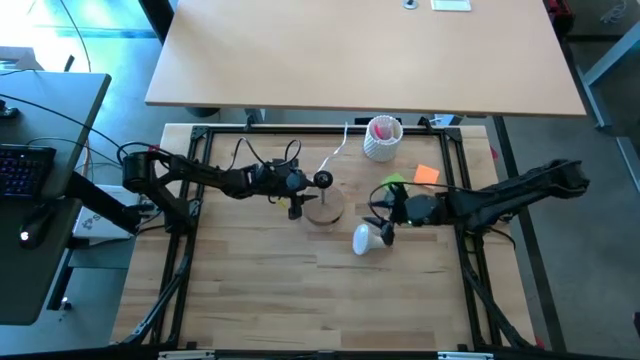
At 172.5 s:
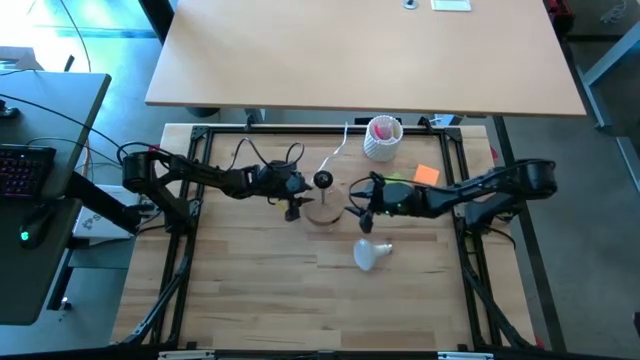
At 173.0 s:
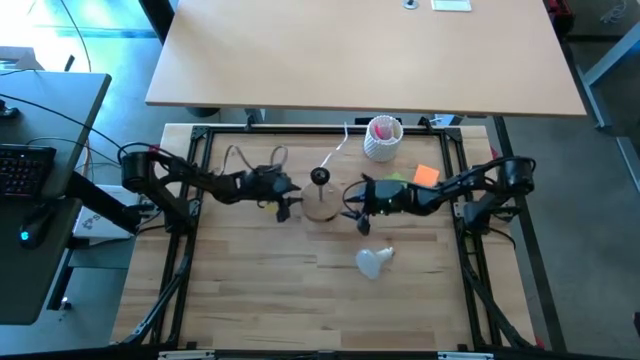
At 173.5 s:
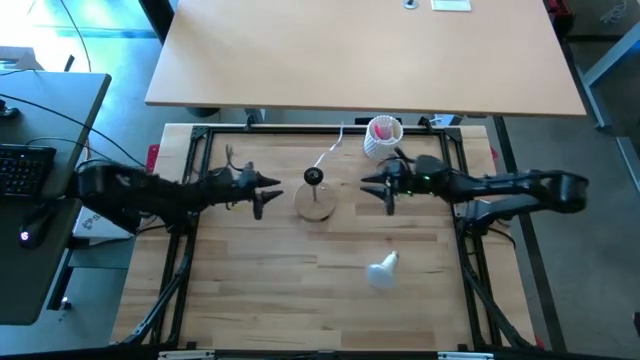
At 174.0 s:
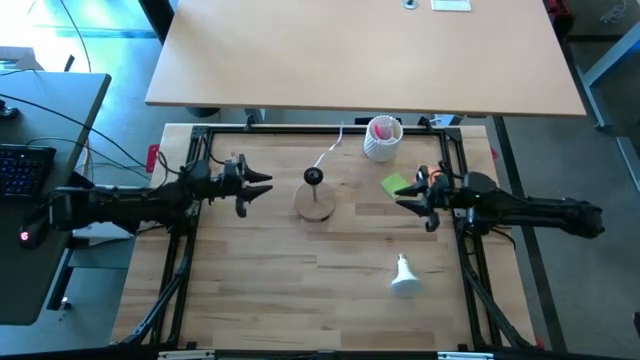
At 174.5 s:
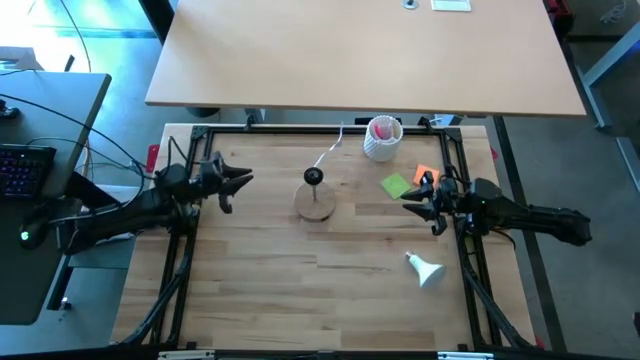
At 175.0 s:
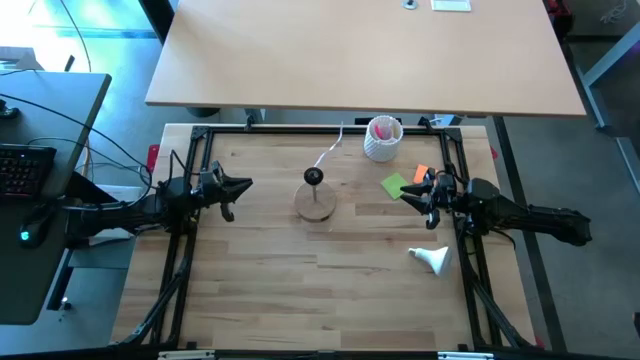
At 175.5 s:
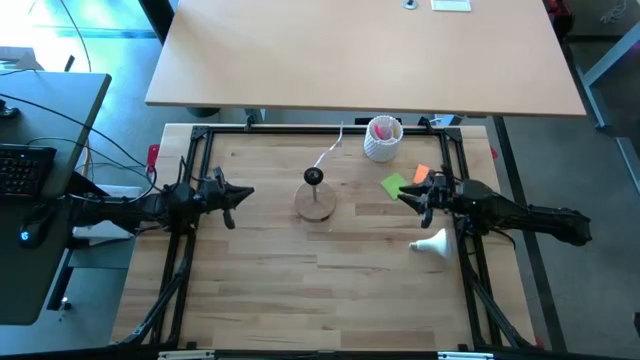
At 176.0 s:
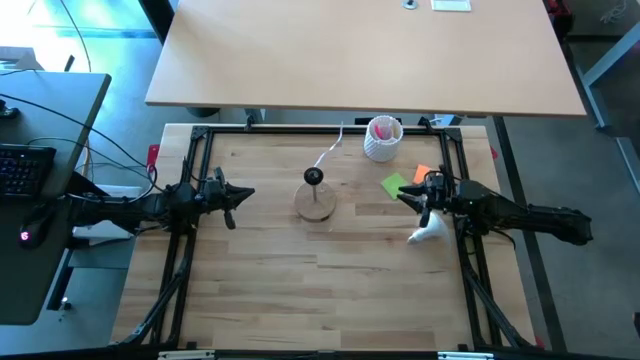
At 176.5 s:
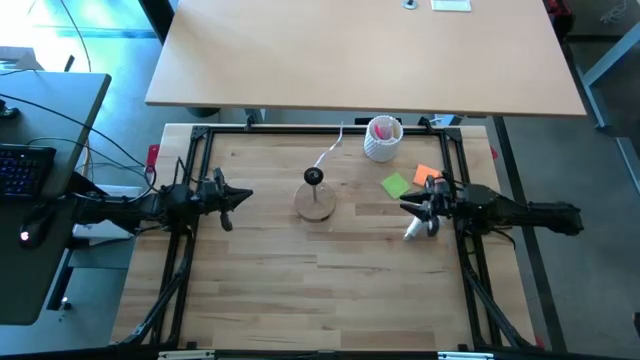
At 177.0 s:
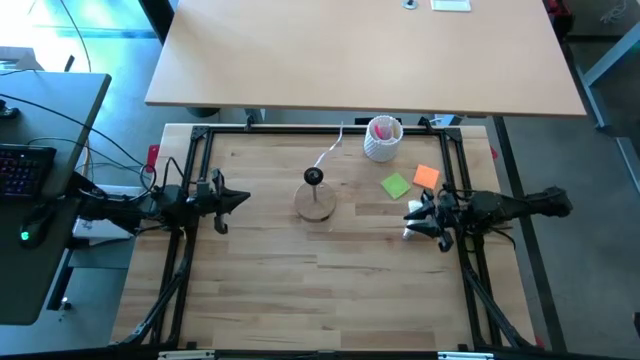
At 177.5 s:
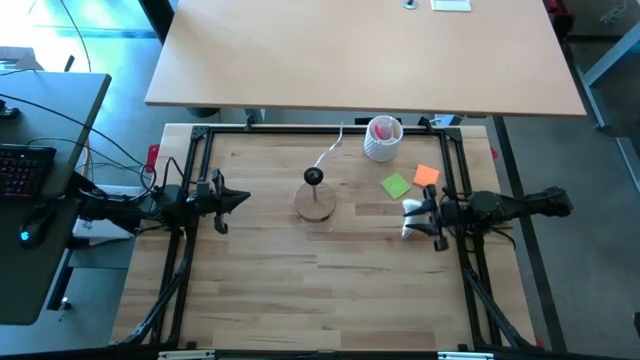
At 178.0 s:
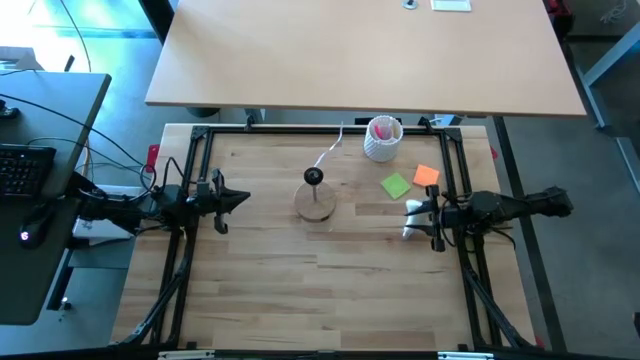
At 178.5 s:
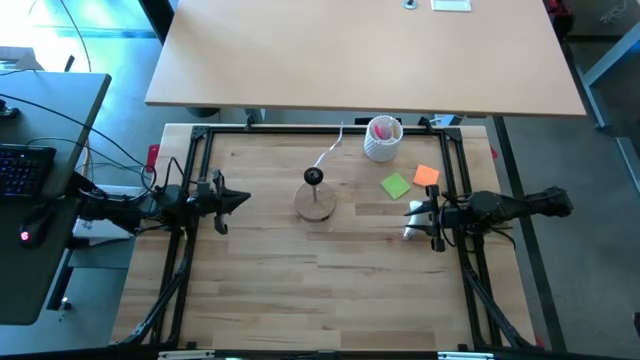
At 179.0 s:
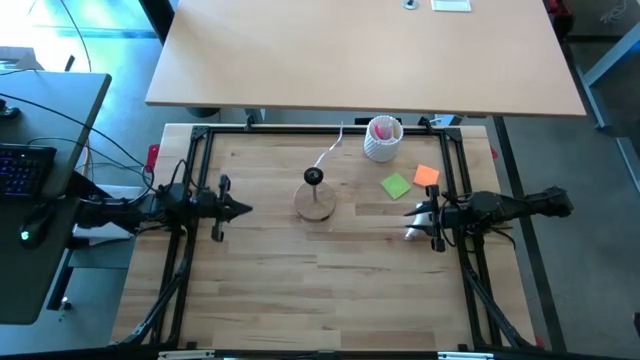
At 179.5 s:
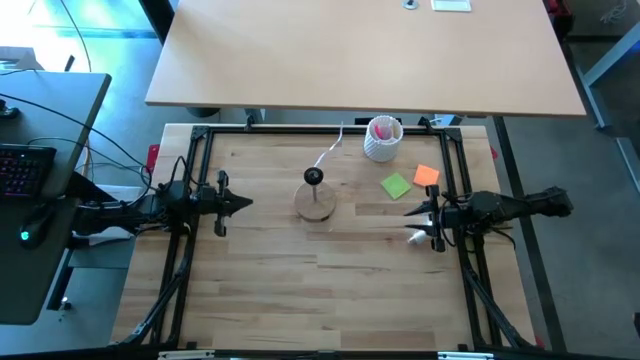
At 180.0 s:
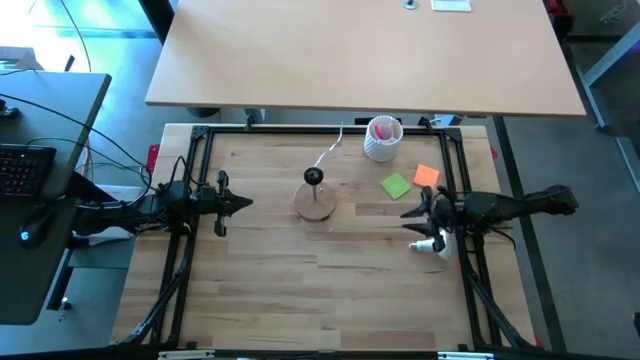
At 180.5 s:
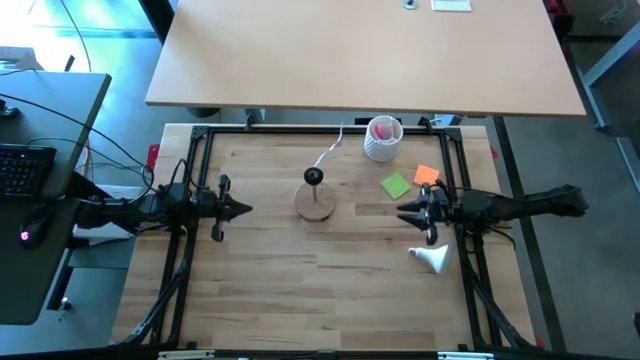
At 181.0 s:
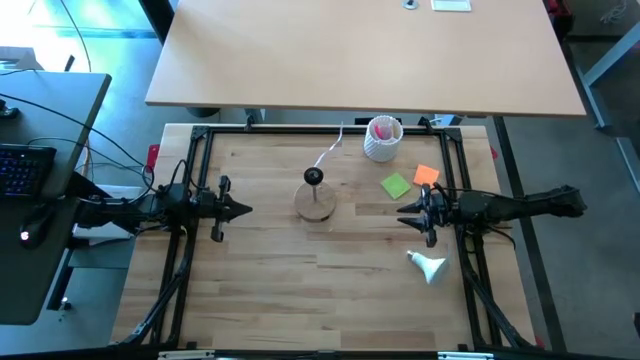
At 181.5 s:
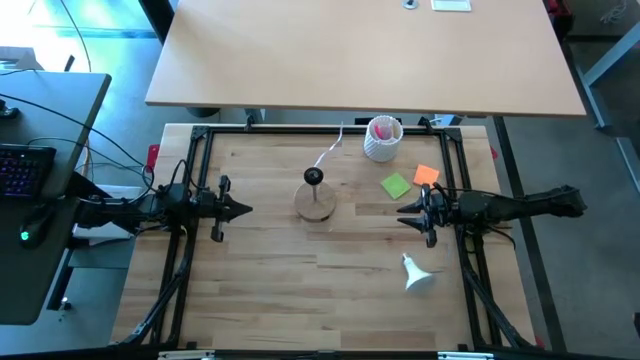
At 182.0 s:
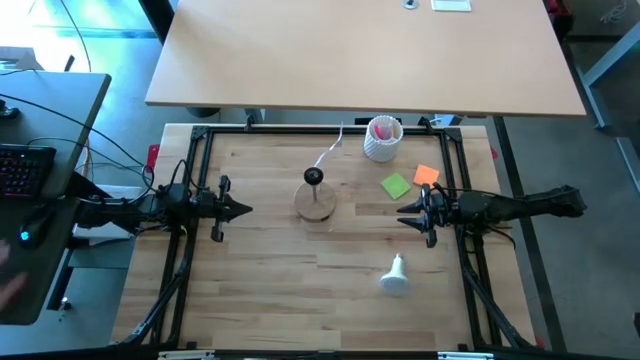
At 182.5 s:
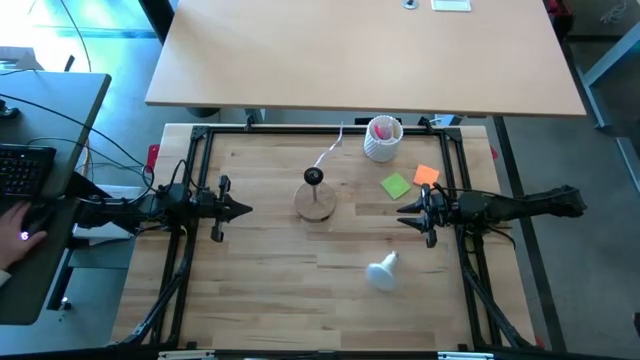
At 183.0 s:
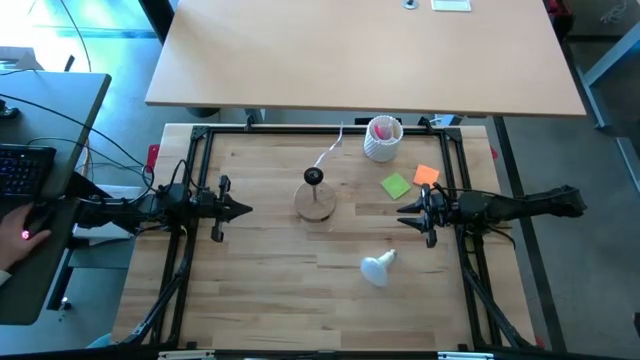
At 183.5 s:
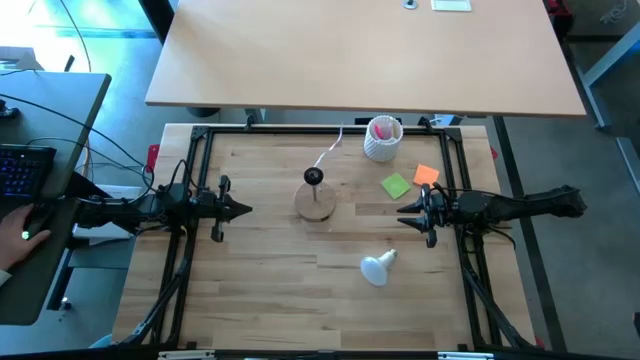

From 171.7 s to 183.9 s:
Task: Screw lightbulb
Return to Home Position

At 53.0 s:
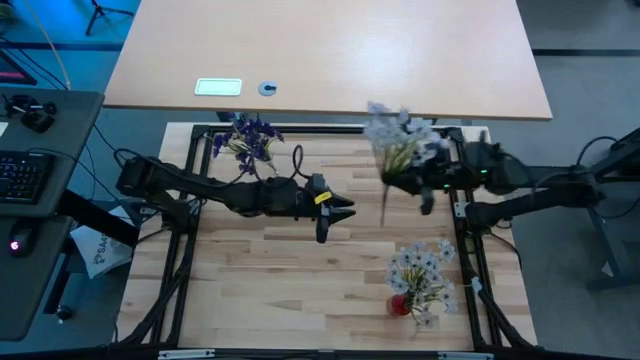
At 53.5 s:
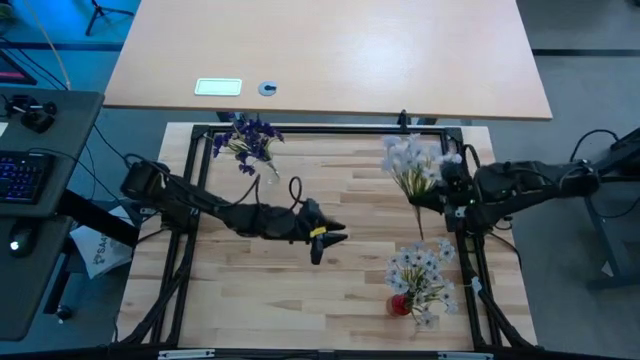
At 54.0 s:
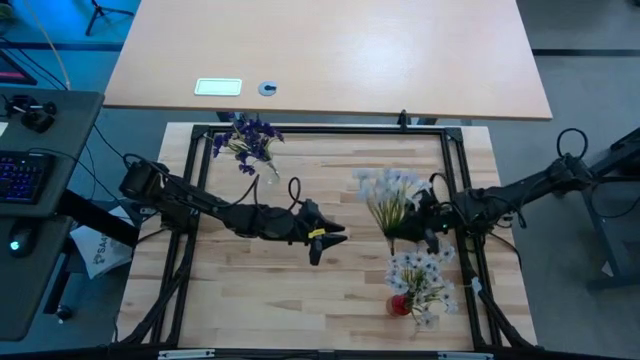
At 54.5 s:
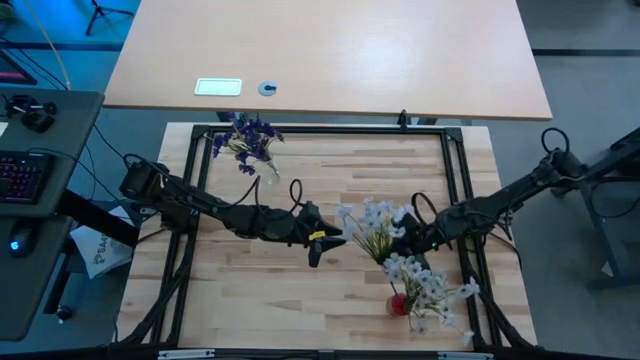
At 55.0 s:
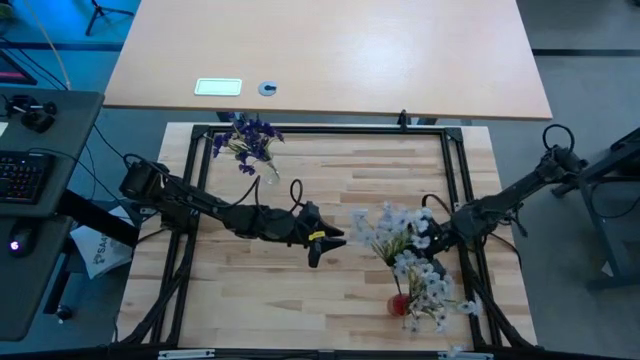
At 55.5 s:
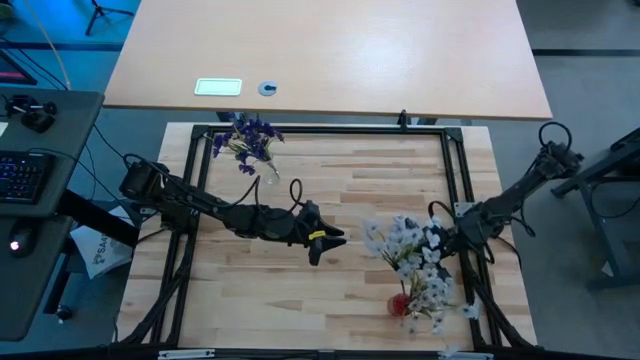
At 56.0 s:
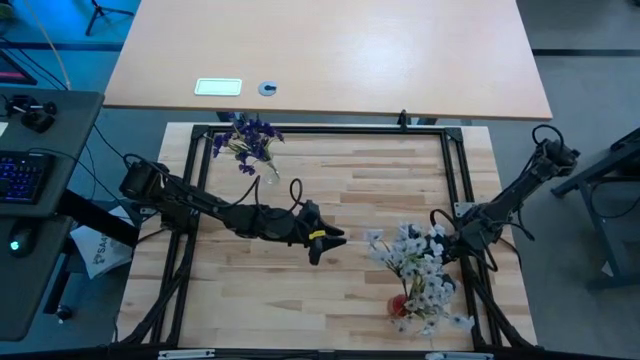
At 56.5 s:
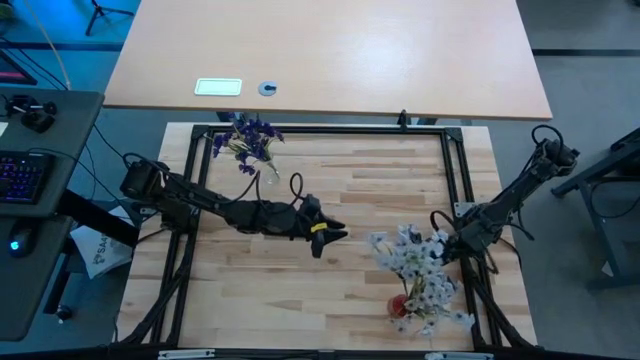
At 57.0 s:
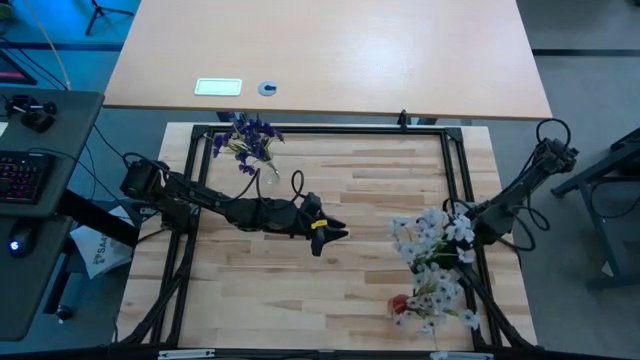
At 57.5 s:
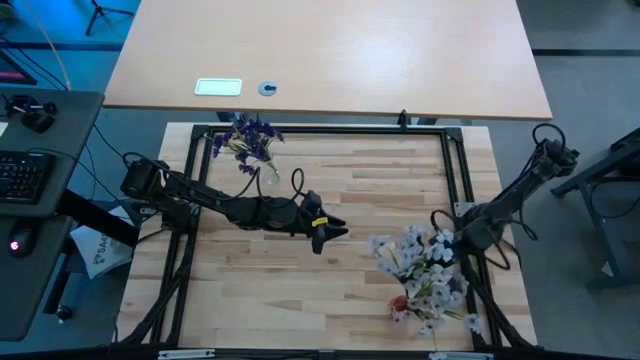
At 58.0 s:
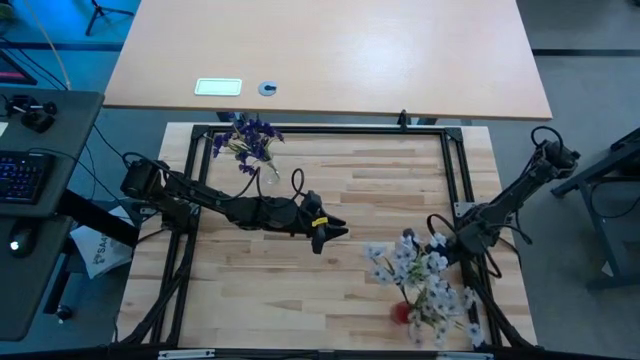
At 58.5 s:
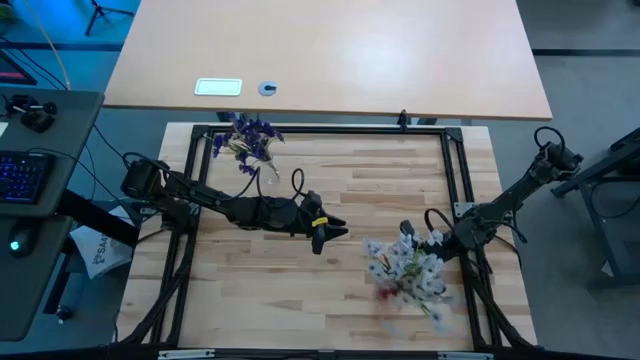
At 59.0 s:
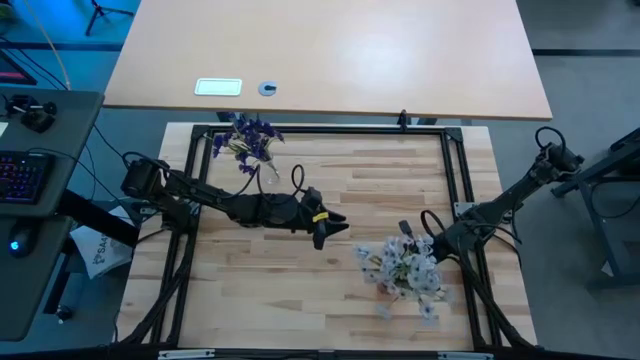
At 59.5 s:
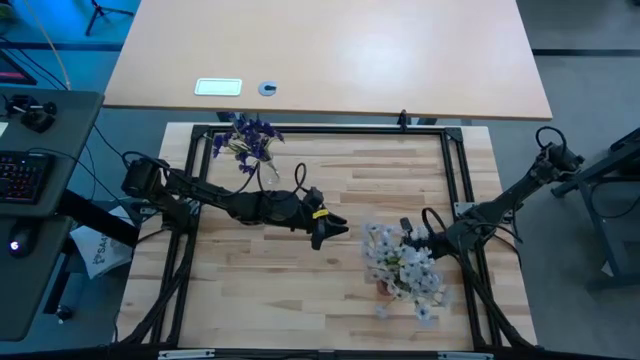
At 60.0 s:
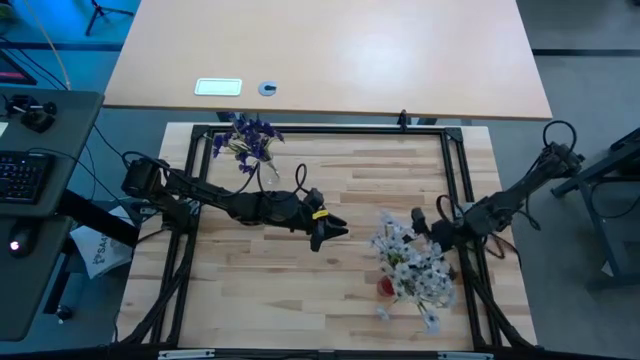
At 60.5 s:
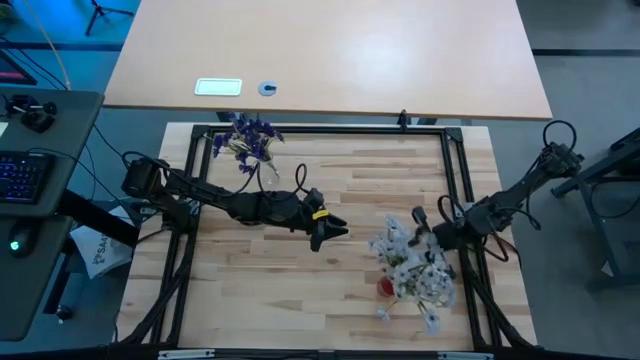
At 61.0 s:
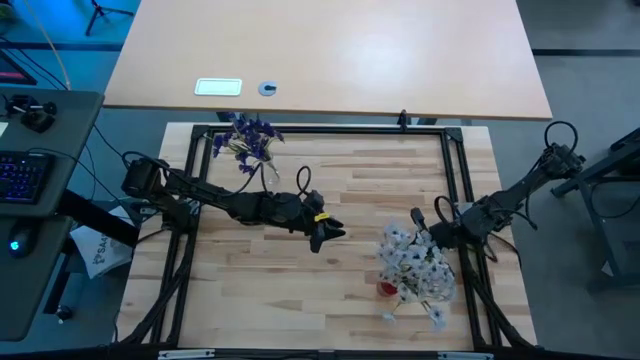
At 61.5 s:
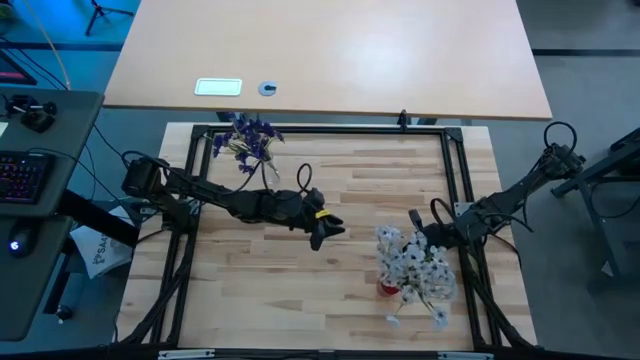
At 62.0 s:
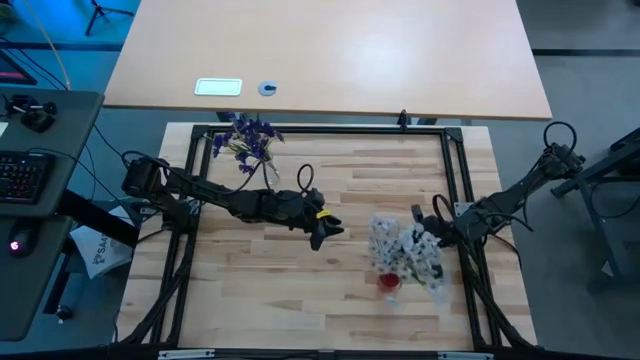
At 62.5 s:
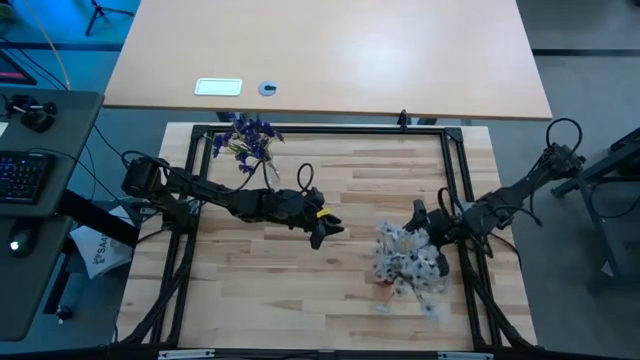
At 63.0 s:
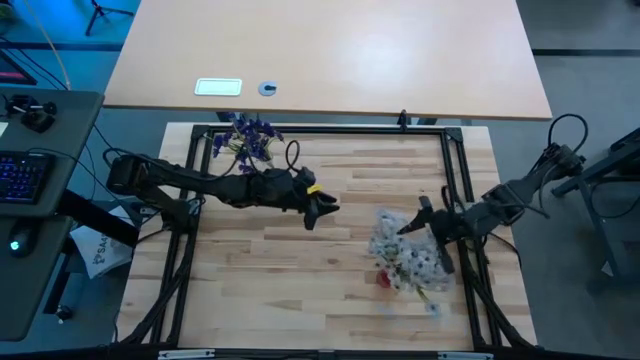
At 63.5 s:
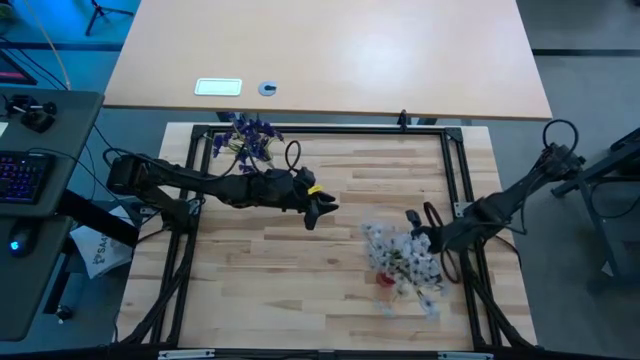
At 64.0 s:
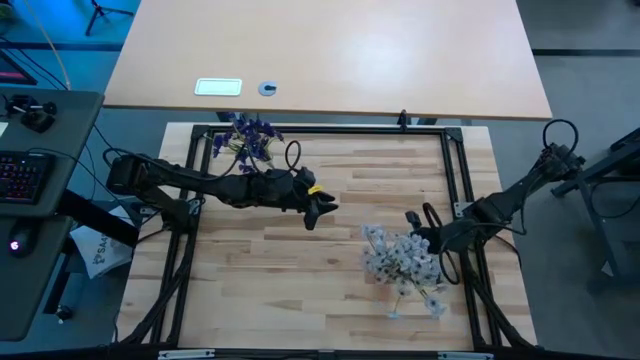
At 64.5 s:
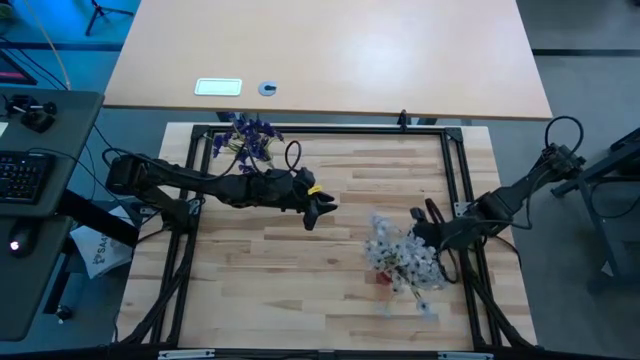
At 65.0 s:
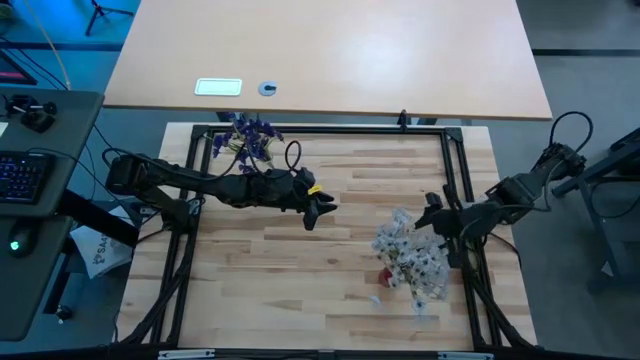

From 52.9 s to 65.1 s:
Task: Sort flowers into vase by color
Put the white flowers into the red vase
